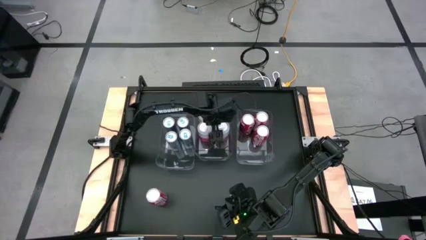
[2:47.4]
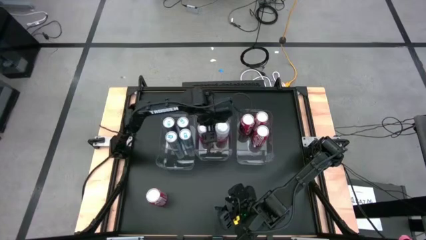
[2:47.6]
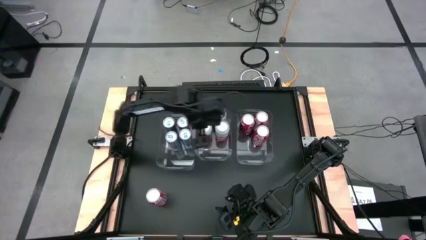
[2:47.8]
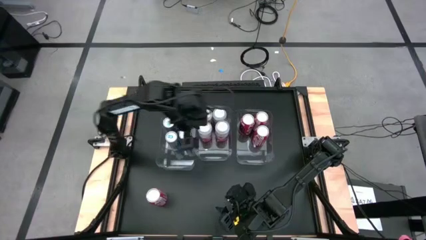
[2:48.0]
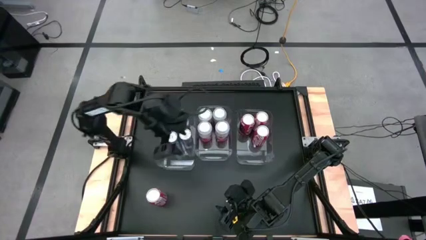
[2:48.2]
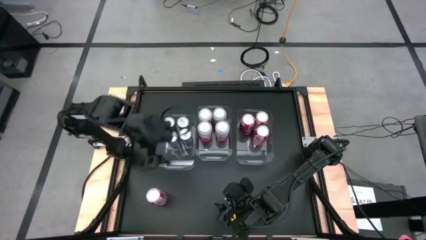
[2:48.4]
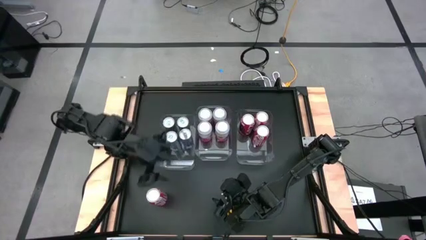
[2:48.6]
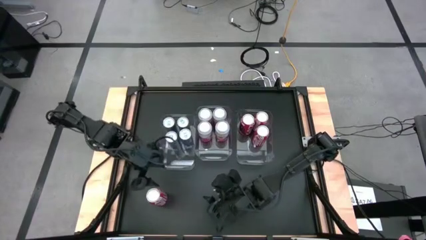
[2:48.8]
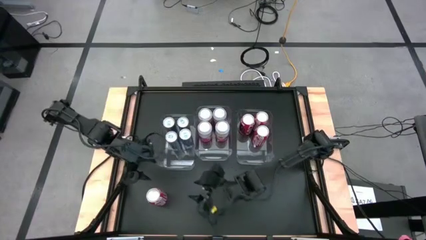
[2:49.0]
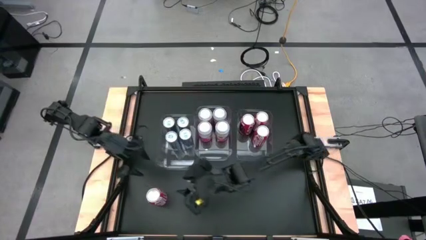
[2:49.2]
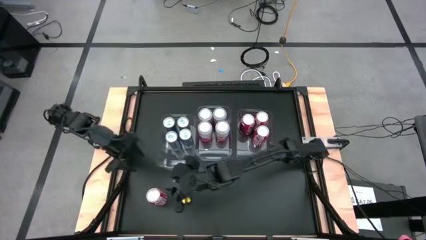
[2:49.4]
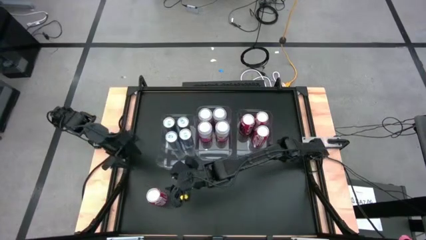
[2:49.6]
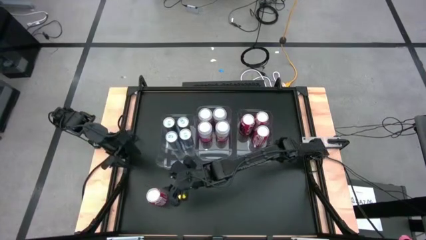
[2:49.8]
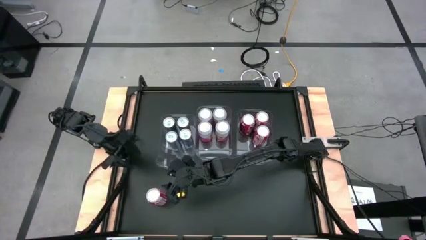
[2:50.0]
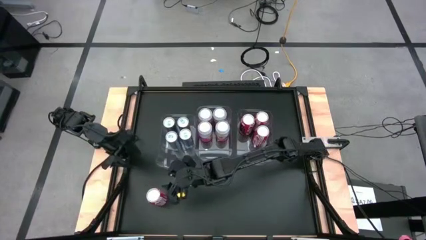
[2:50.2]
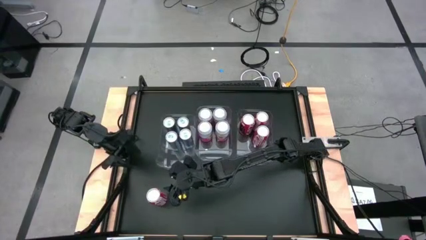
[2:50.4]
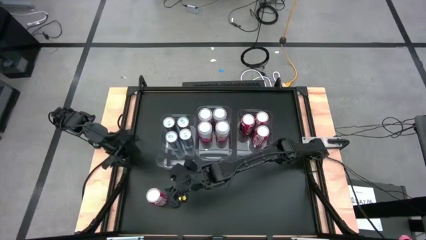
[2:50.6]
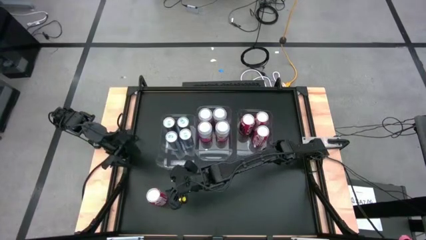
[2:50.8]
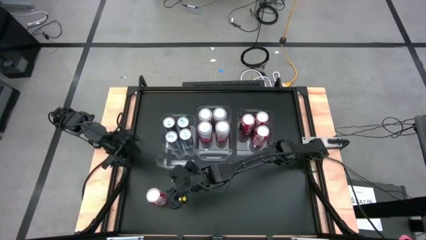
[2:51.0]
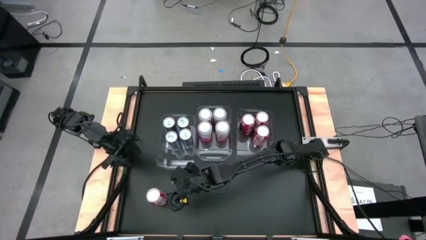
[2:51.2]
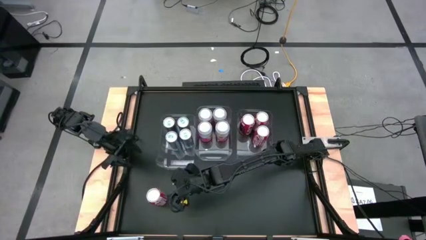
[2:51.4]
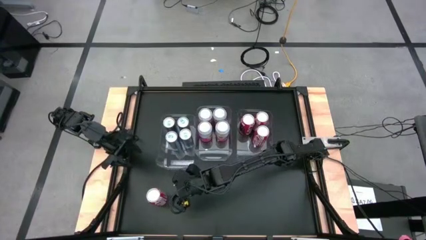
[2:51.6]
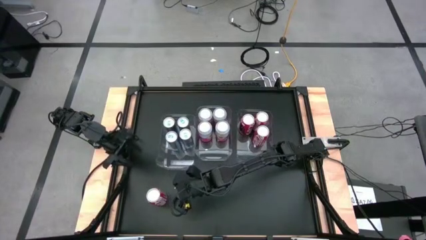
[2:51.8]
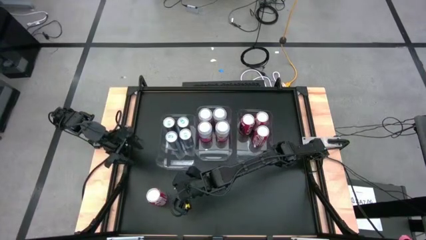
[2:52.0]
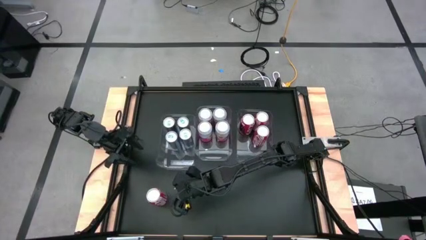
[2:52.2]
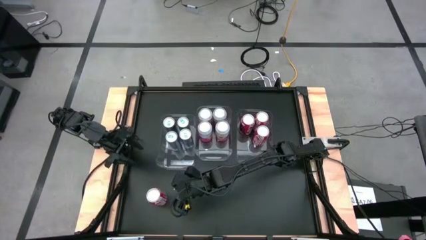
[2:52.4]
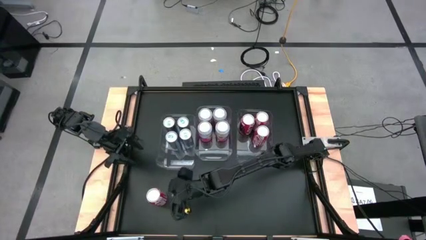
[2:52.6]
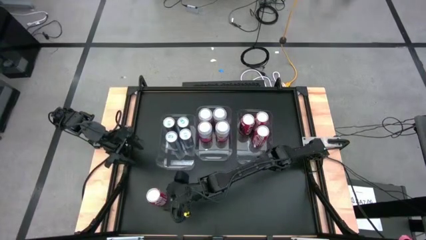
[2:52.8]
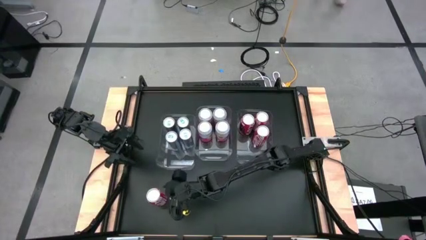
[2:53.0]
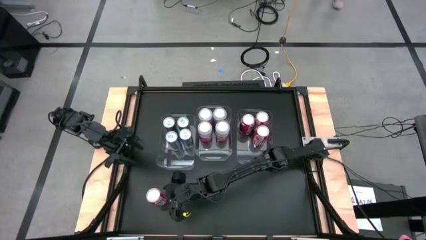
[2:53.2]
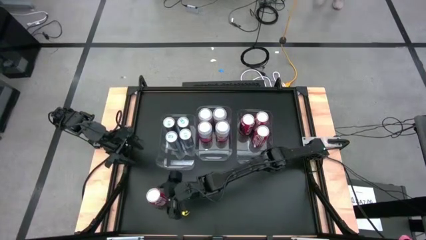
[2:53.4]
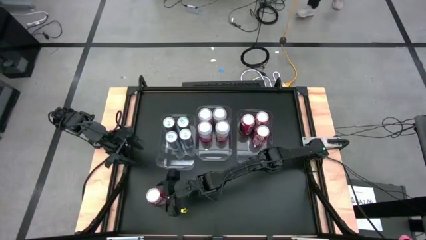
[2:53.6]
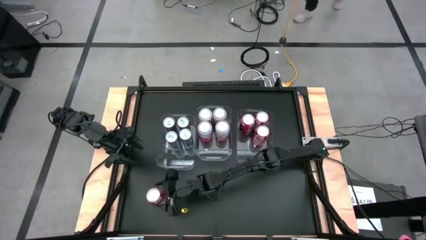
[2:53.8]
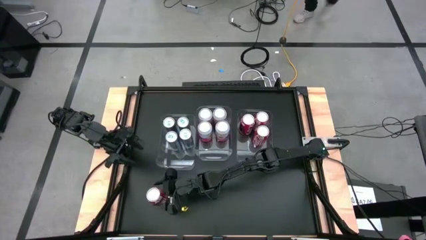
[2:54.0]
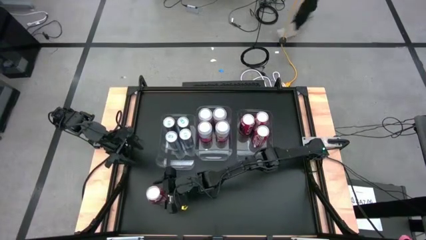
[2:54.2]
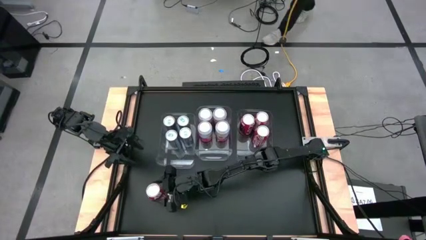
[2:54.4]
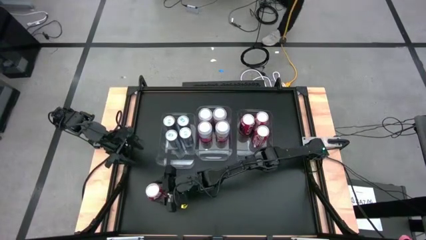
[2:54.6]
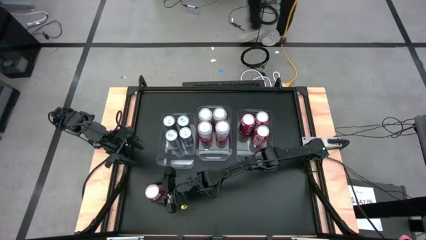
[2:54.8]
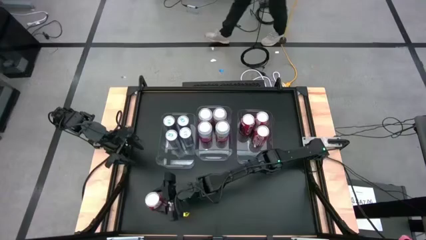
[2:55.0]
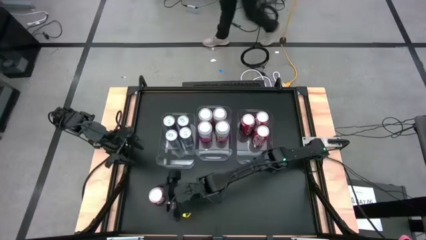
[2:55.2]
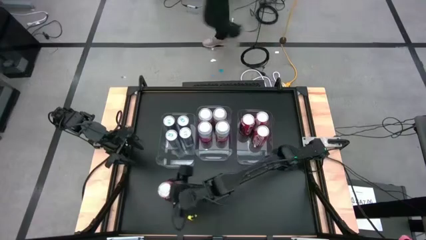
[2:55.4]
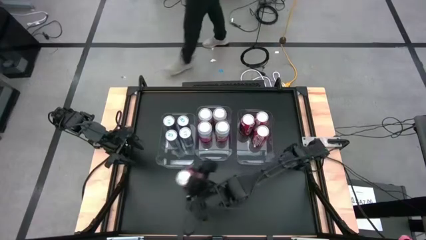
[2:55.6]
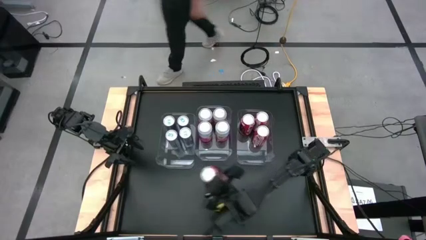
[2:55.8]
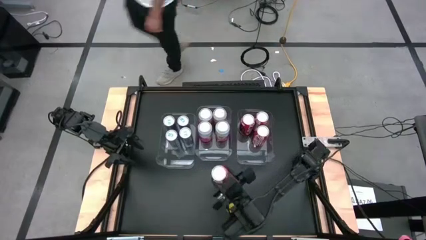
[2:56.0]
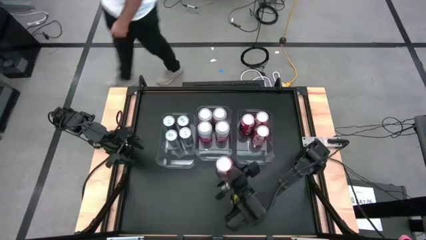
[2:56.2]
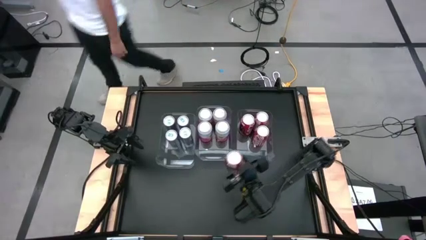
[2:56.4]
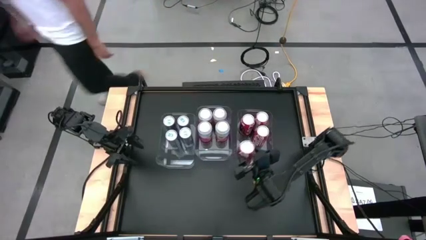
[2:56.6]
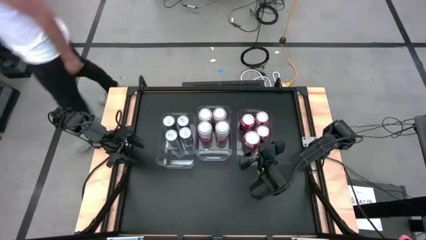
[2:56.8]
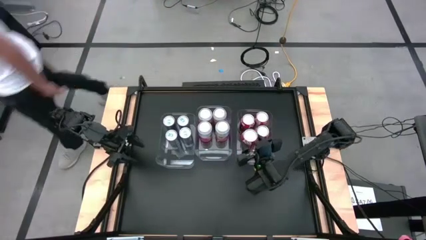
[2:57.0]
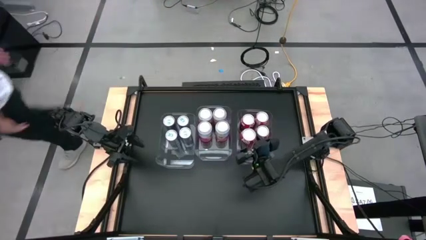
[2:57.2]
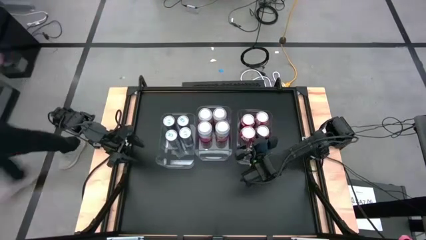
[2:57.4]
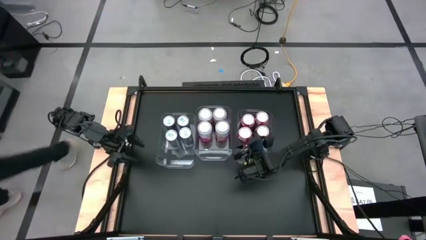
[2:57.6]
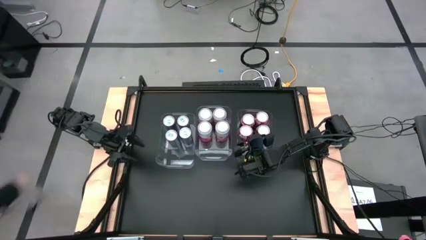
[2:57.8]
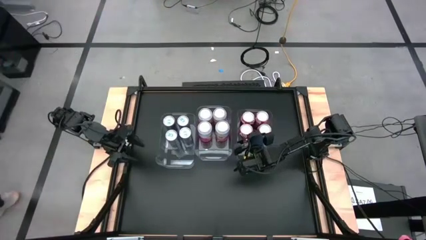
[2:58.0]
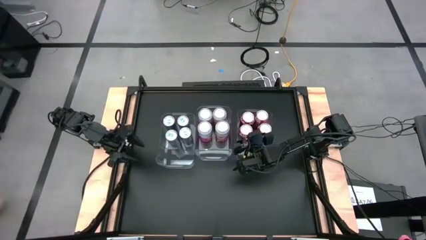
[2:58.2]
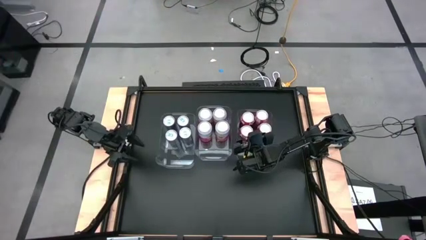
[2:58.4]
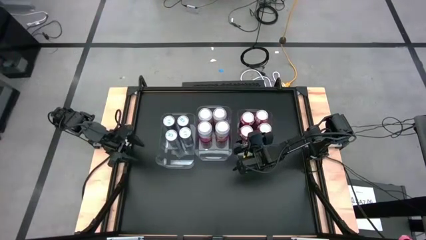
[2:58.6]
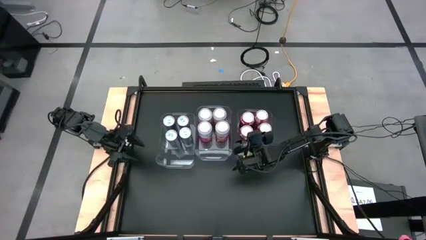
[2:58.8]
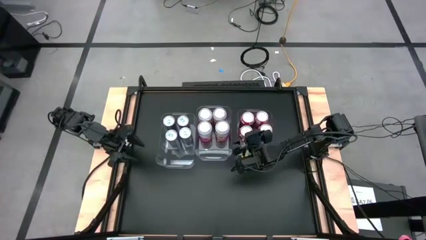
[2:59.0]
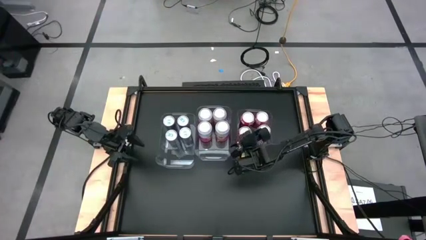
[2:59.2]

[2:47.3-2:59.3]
Task: Sort soda cans
Put the bottom left red soda can into the right transparent bin

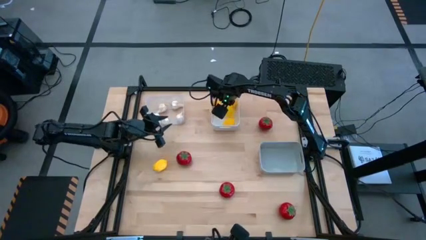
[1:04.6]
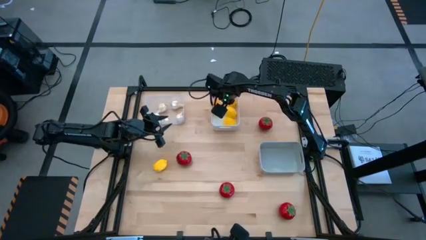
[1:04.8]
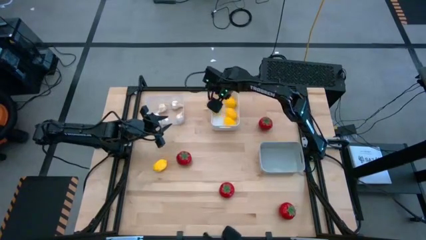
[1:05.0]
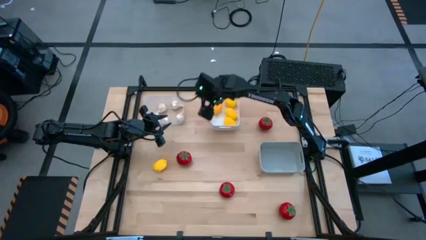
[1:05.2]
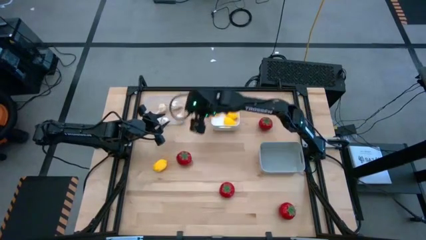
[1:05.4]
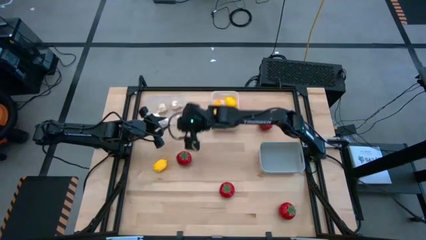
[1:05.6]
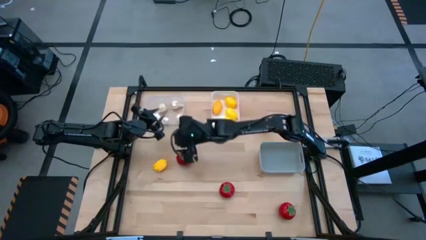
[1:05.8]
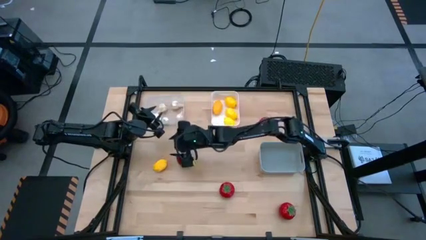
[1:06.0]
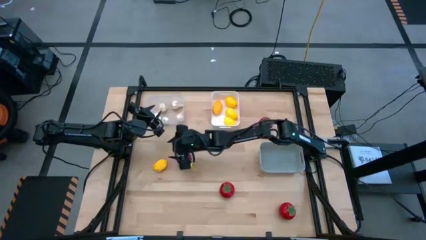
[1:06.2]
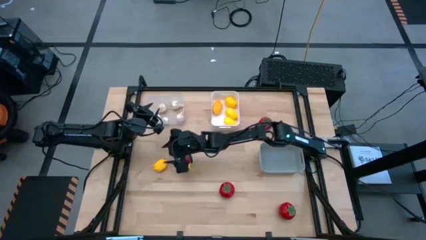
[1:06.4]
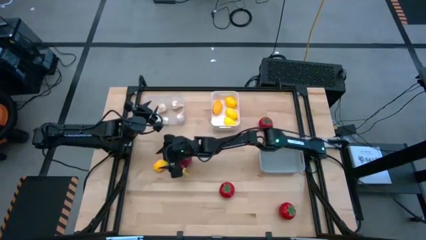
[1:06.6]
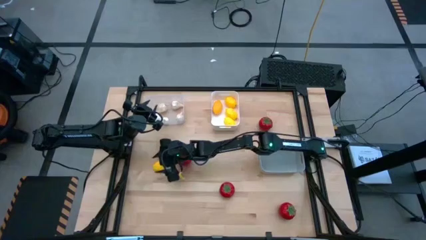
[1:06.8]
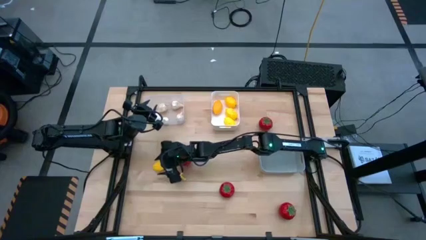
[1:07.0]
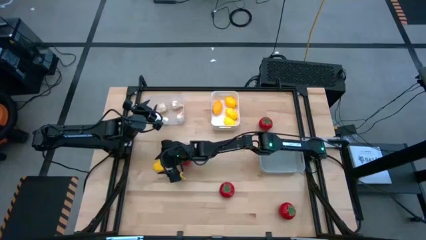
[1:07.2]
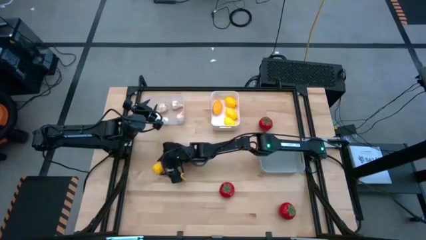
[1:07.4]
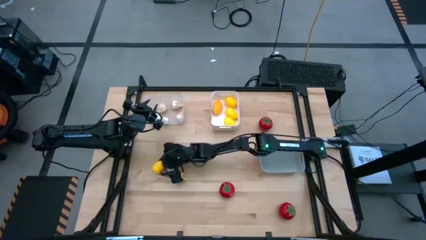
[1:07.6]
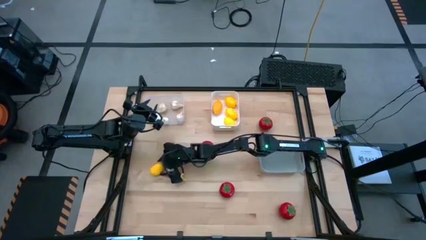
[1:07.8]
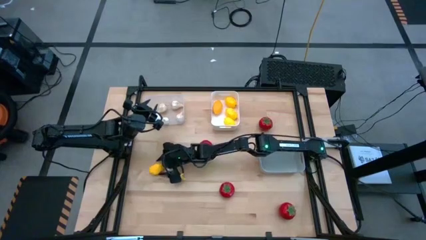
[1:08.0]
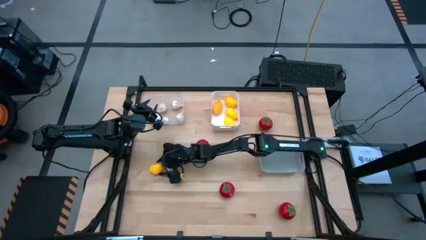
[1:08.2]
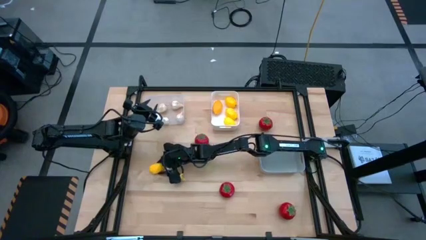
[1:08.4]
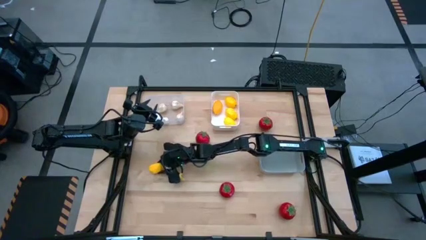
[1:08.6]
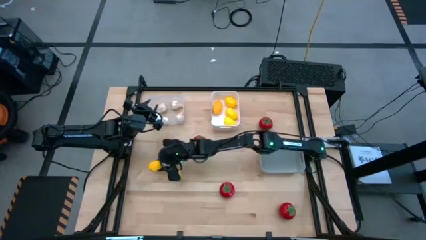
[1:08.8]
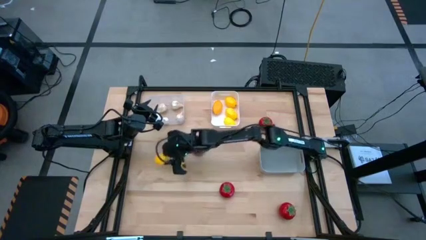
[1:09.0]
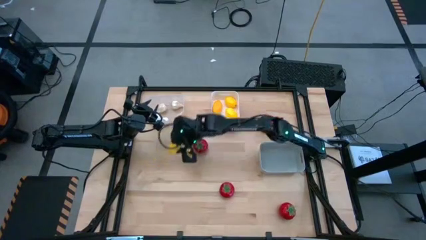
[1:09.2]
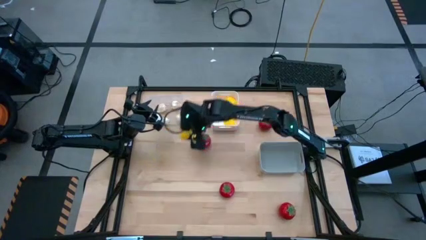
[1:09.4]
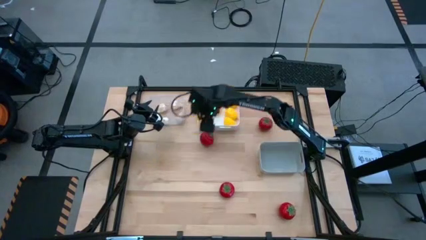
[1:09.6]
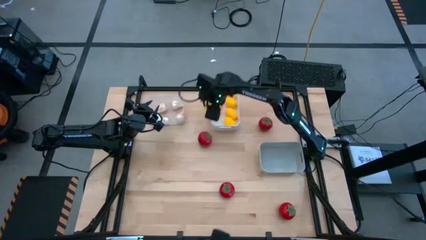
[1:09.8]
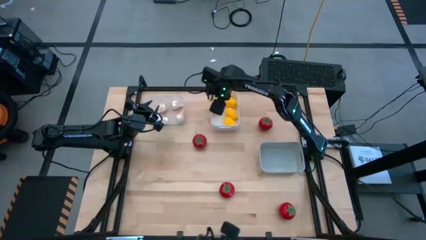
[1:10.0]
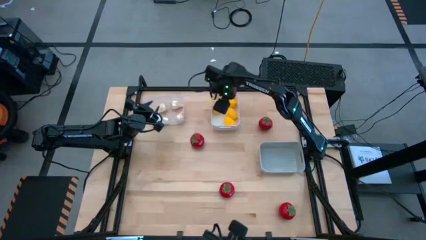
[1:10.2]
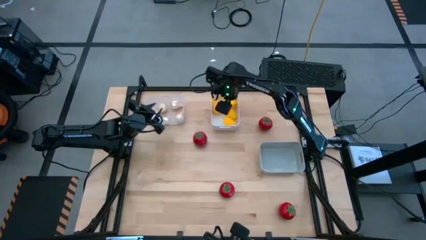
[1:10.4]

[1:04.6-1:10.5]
Task: Sort produce into baskets
Put the lemon into the white bin
